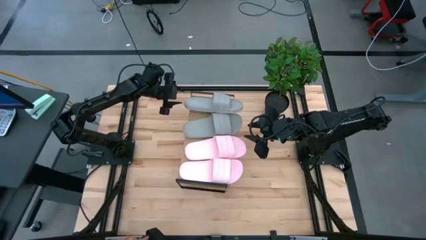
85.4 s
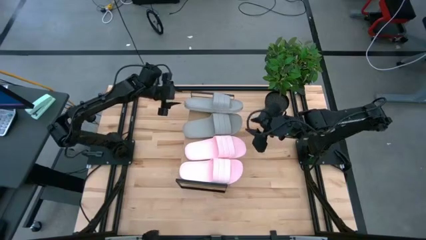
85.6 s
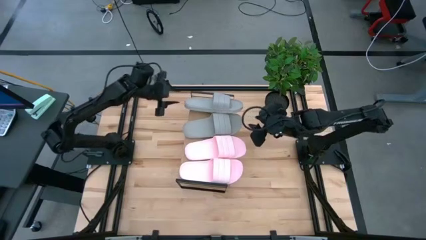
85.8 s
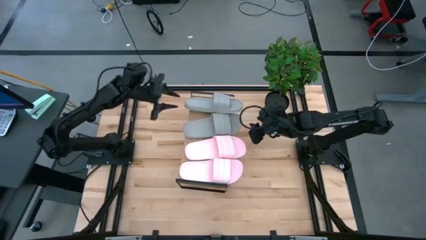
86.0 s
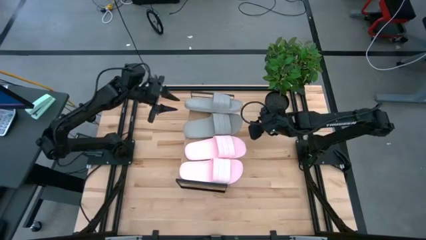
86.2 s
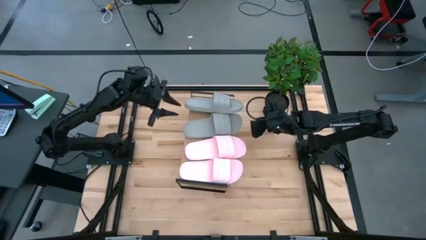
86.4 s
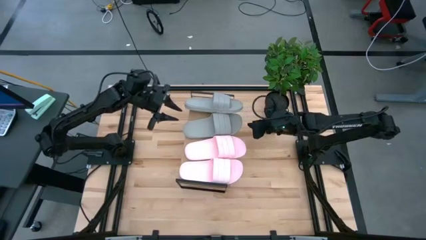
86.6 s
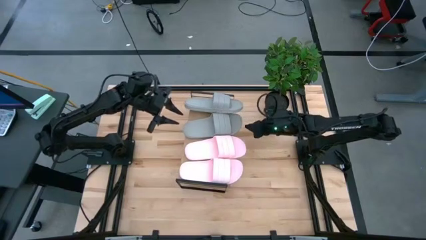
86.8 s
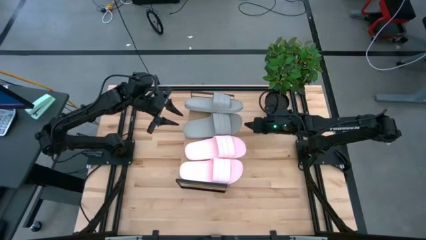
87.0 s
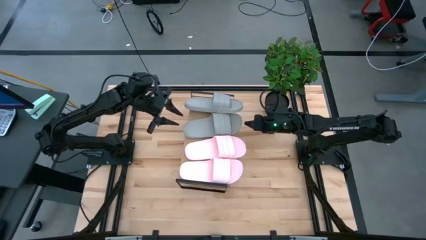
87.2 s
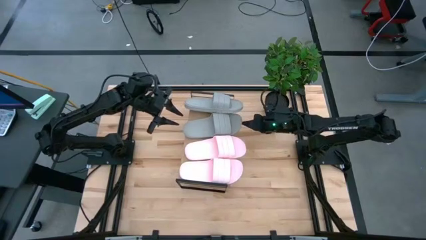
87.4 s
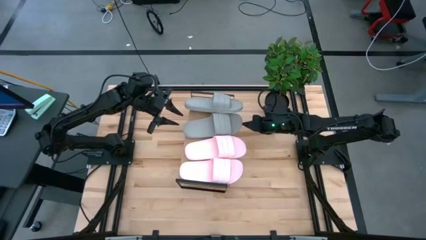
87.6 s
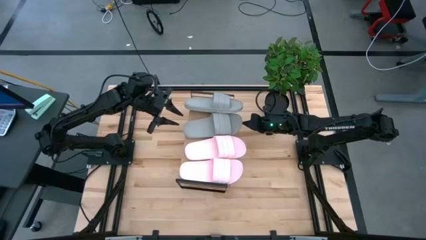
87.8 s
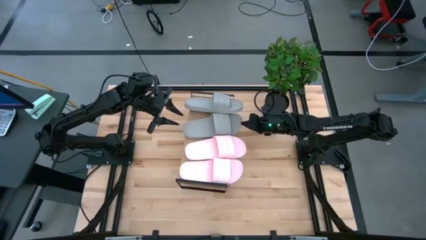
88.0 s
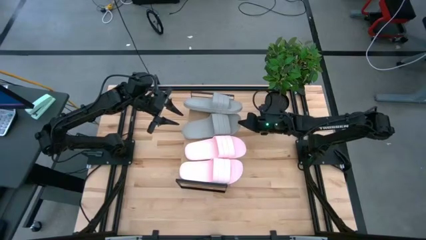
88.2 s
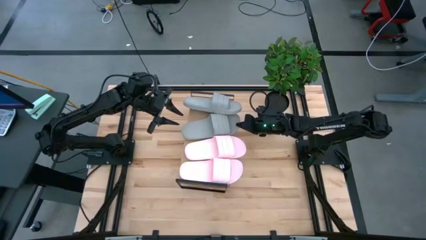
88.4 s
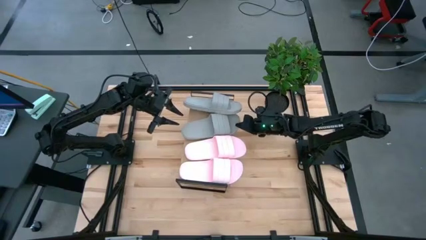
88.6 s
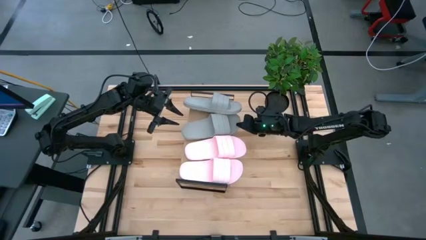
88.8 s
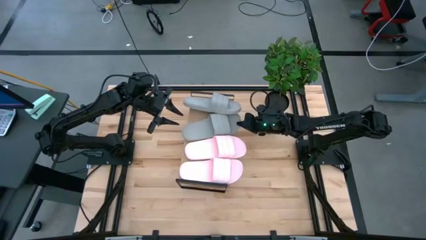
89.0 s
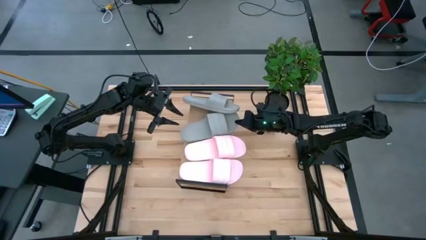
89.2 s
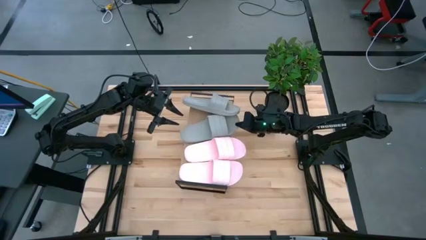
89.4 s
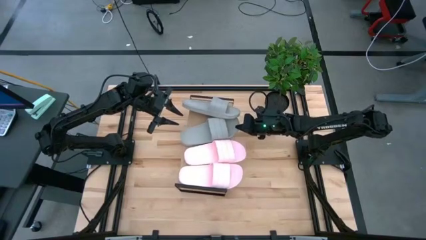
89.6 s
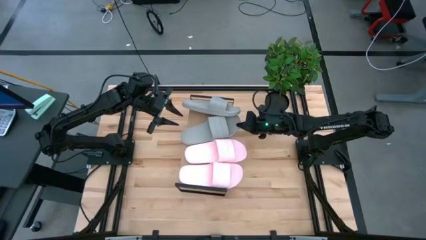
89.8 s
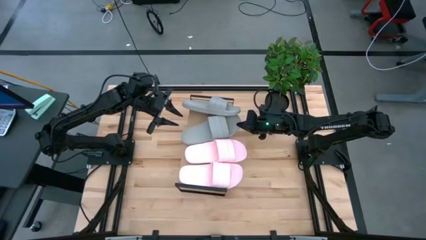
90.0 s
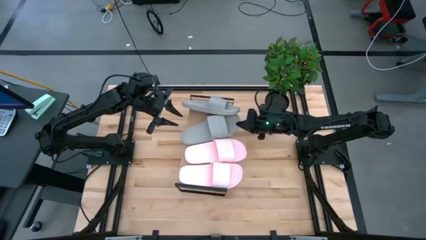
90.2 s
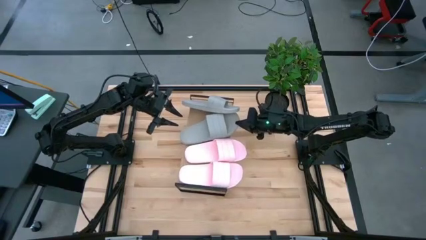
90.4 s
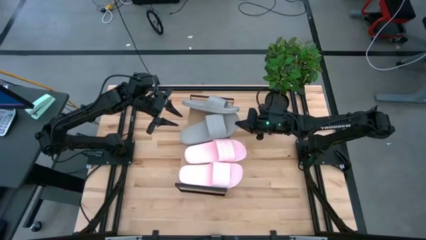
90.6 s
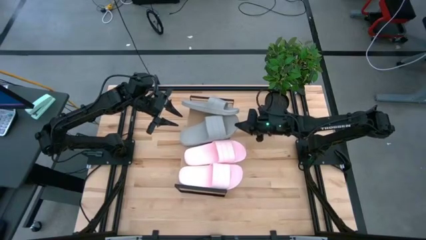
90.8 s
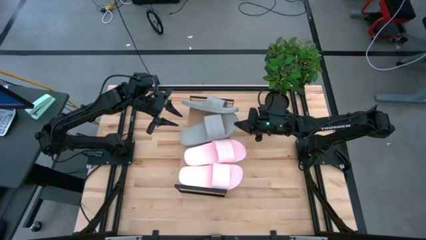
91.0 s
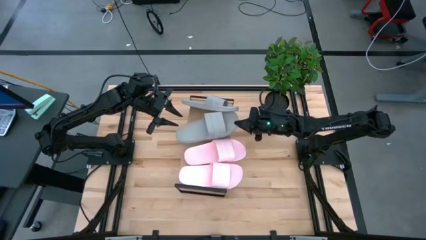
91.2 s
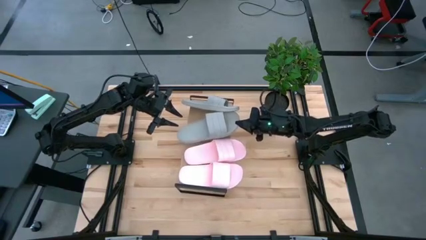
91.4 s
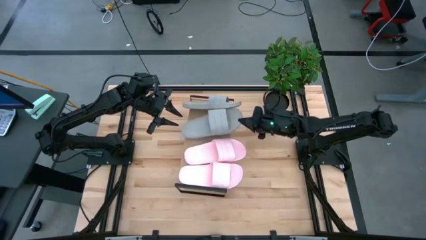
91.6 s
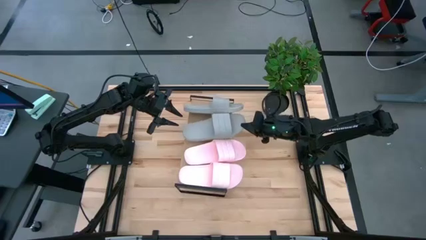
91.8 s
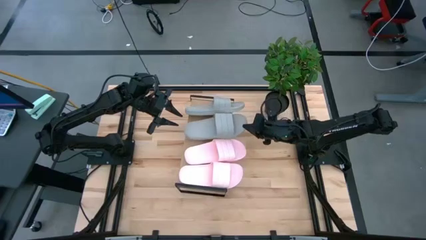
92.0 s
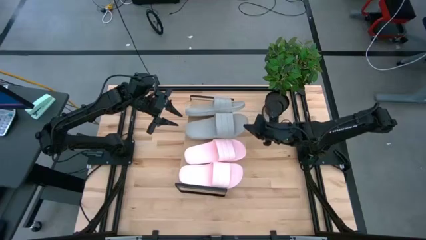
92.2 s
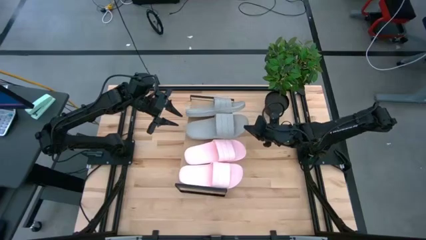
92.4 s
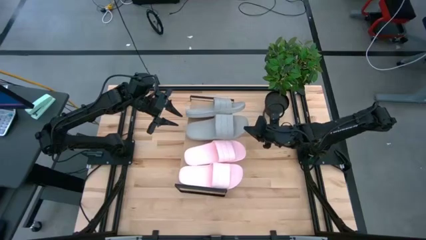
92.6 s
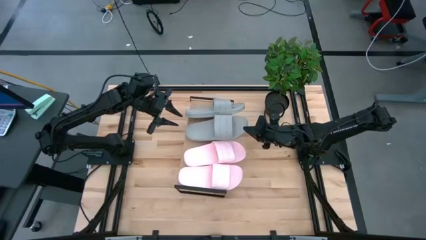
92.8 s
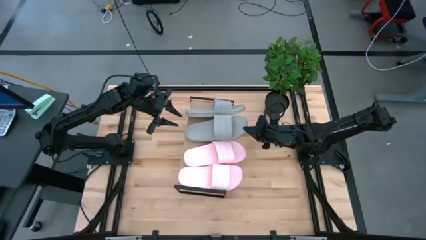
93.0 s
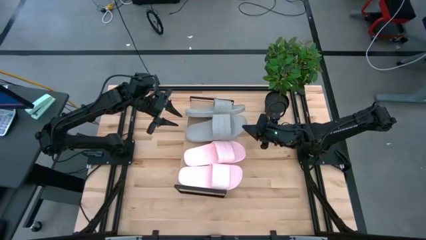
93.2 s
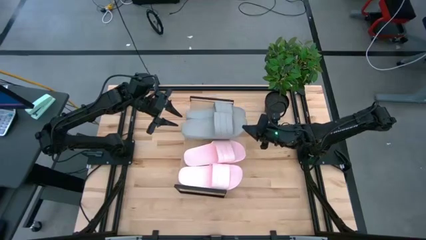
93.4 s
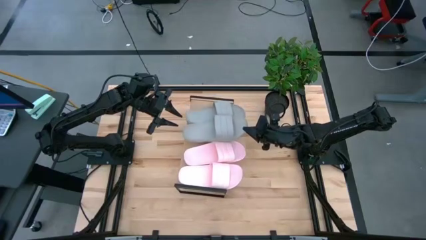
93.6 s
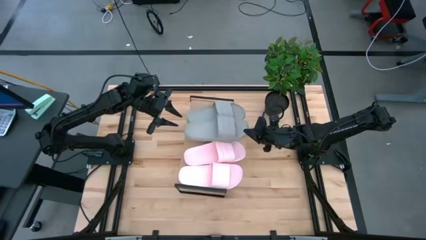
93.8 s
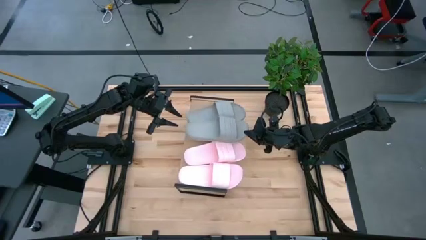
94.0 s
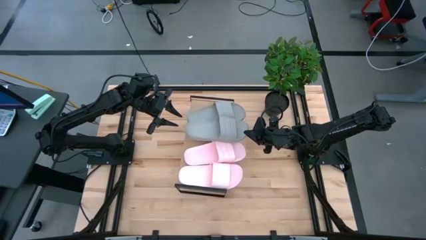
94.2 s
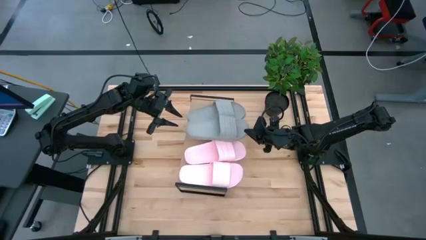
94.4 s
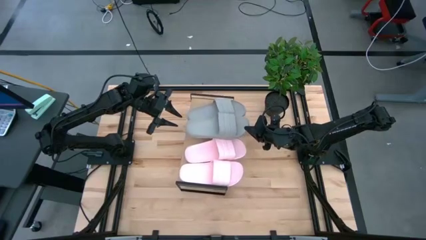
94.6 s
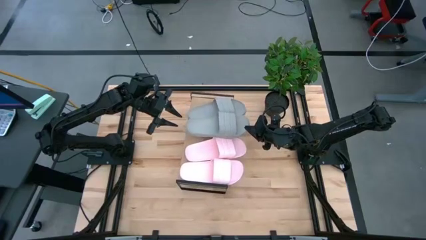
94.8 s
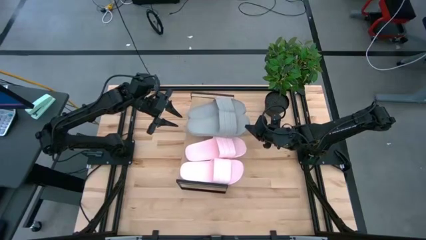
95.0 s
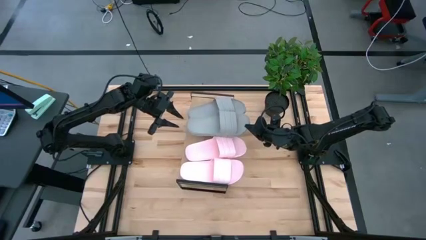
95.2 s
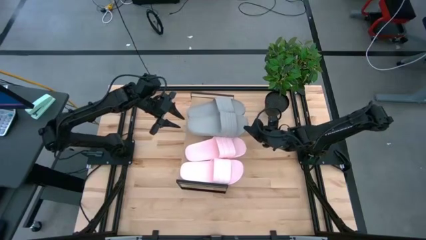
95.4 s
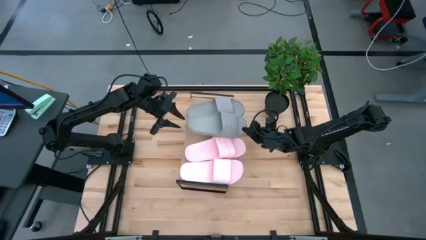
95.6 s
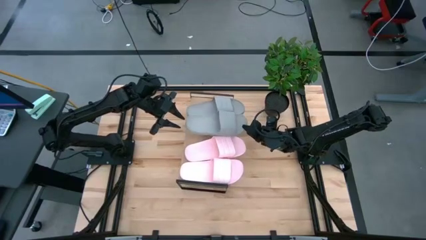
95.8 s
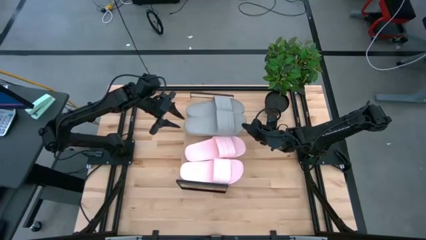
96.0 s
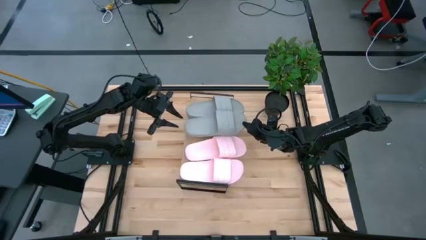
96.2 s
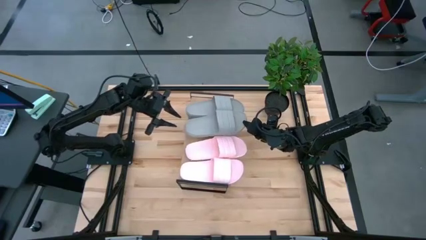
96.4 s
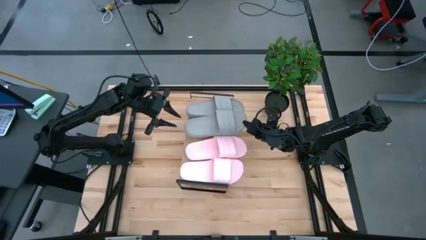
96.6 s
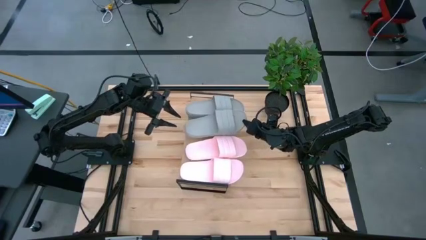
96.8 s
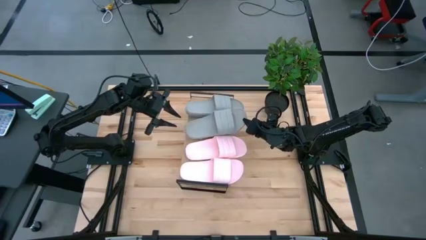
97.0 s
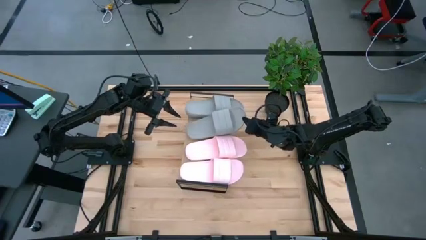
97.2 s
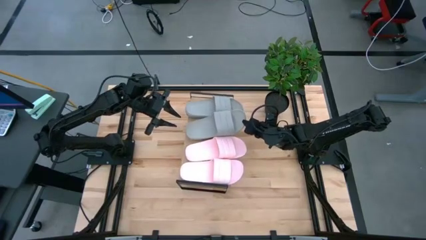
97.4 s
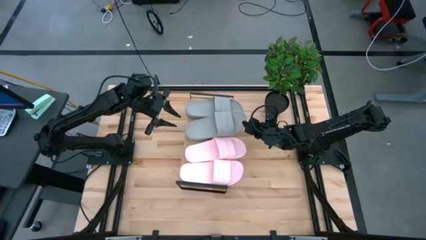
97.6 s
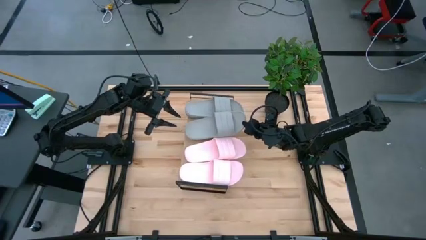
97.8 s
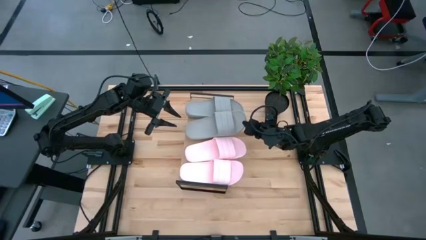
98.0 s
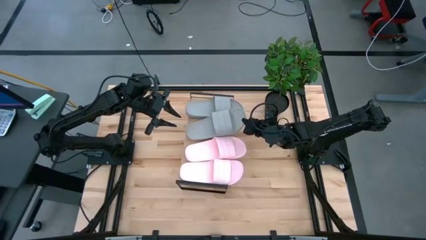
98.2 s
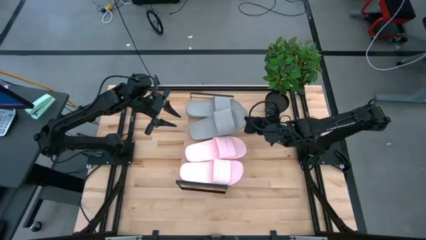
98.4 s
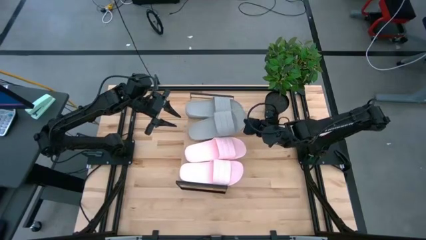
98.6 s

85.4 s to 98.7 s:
Task: Pick and place slides into the shelf
Adjust the gray slides on the shelf
